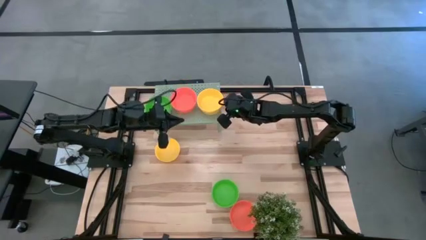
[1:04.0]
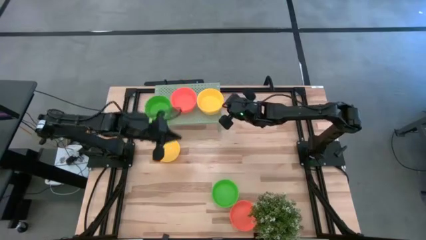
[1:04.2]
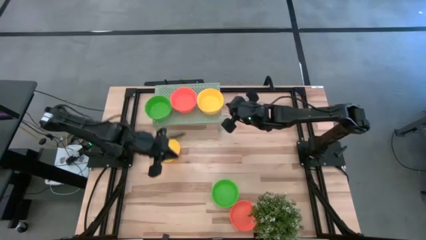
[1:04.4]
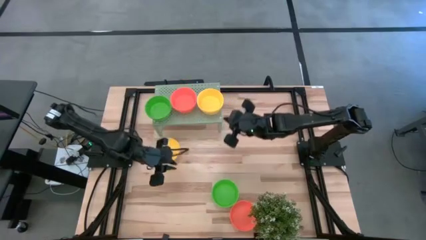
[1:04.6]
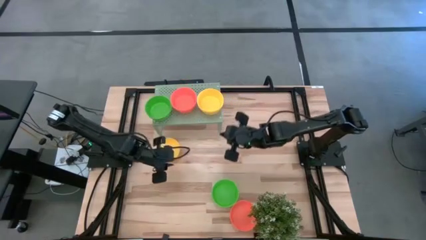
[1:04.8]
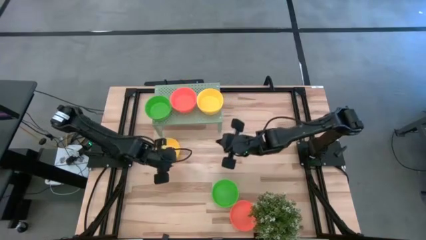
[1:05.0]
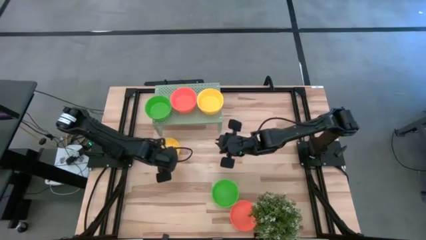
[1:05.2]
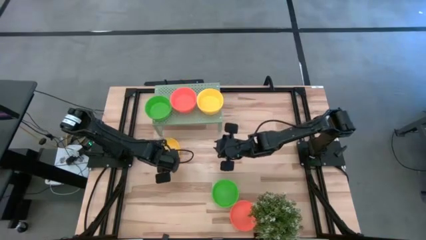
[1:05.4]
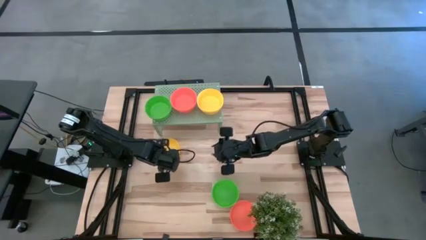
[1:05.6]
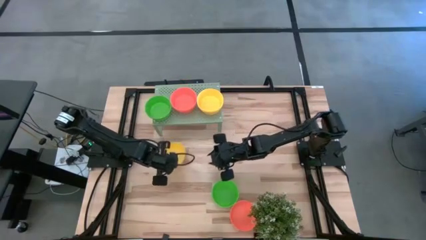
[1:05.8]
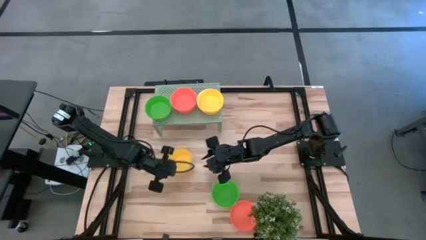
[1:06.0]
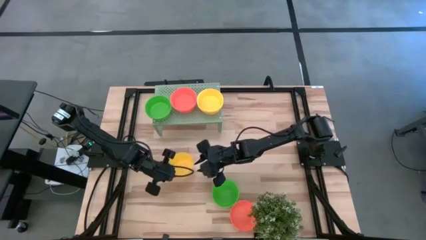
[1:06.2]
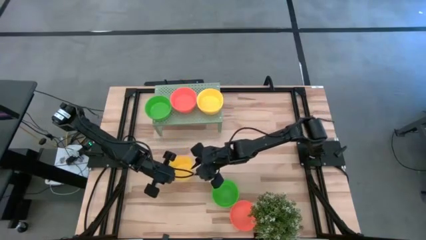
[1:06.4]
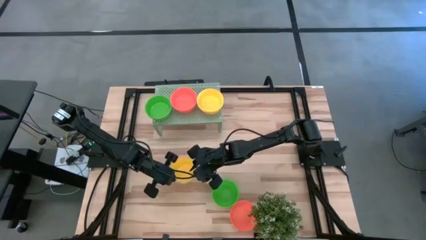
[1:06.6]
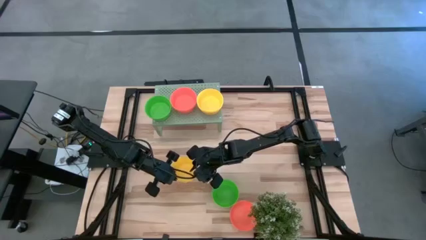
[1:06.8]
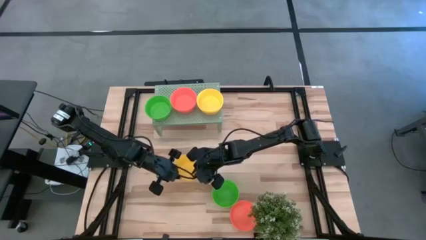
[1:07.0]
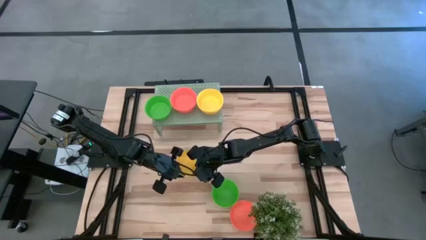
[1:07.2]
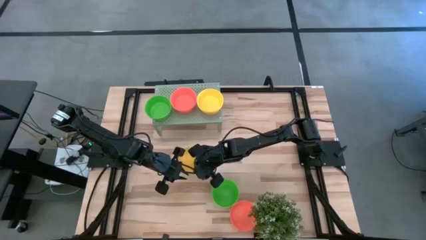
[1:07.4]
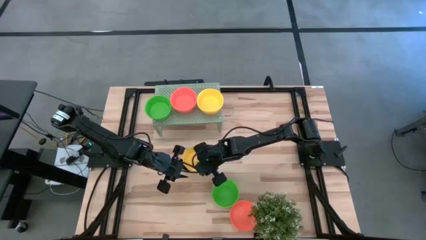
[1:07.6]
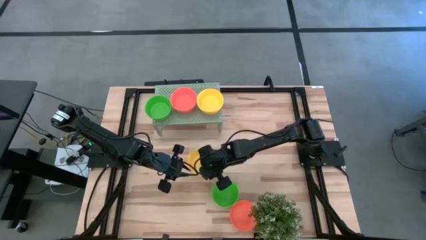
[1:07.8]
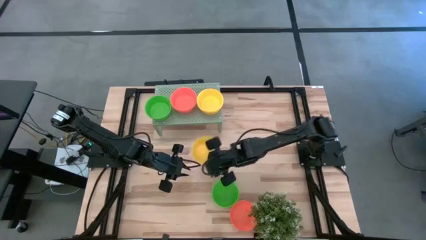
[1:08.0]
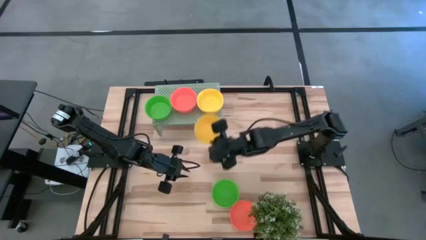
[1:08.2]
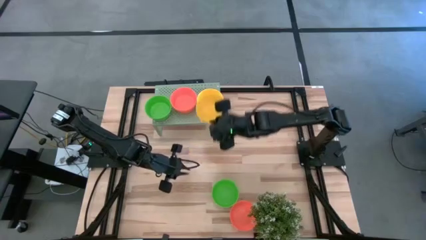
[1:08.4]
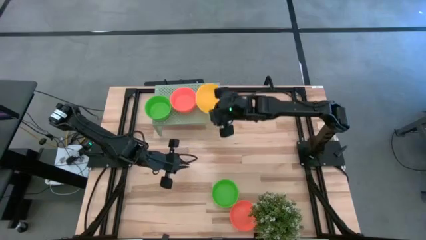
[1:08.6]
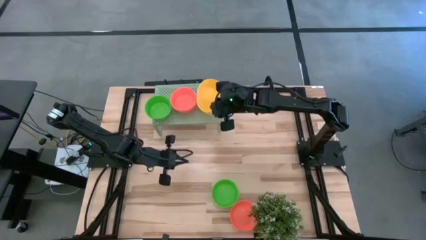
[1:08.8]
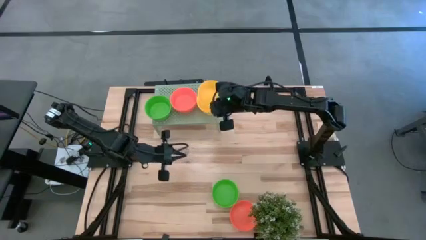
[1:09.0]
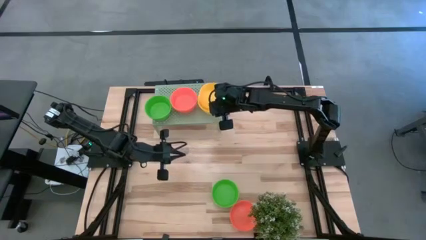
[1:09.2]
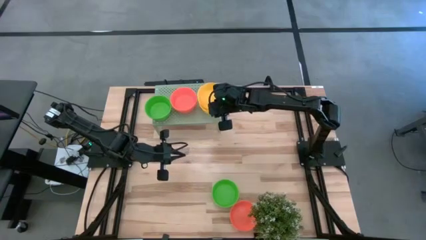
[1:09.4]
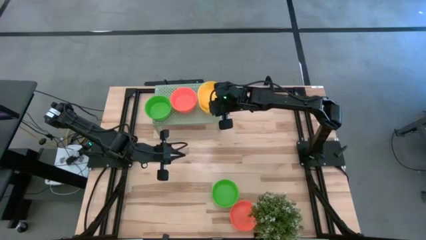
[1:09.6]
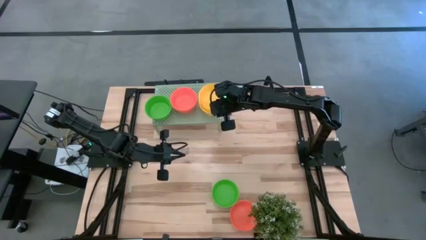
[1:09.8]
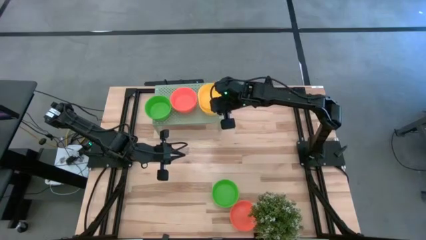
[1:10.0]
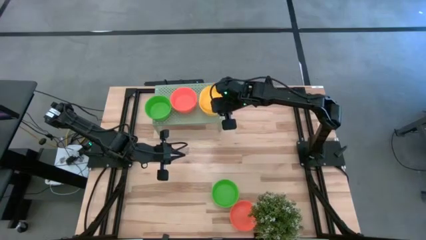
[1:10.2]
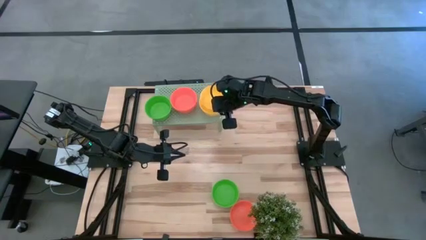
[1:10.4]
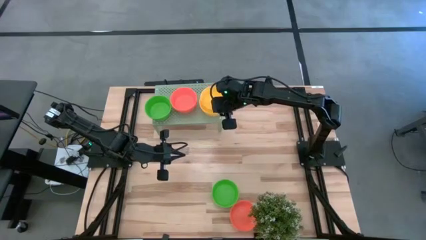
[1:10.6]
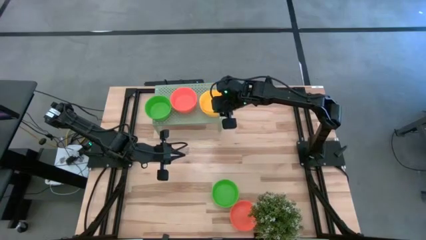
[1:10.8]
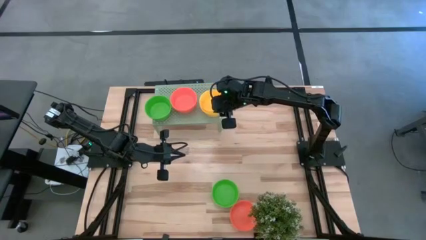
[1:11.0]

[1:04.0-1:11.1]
Task: Pick & Place Mini bowls
Stack the yellow bowl on the yellow bowl on the shelf

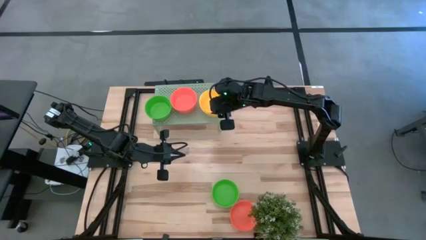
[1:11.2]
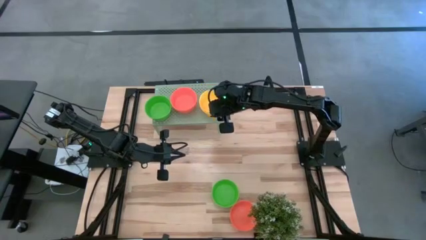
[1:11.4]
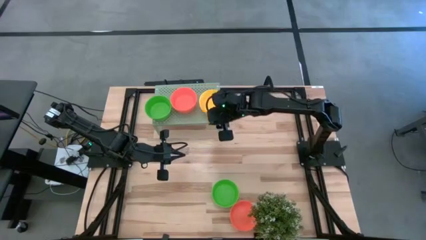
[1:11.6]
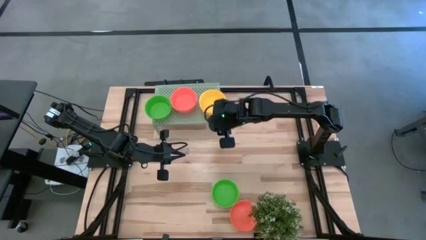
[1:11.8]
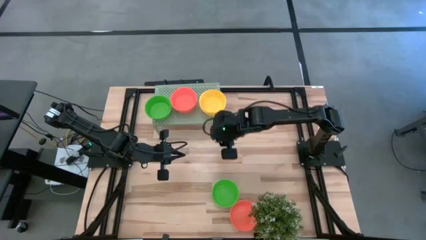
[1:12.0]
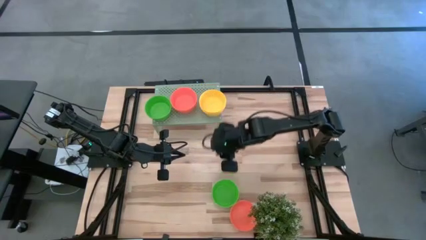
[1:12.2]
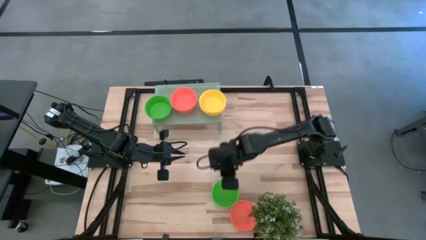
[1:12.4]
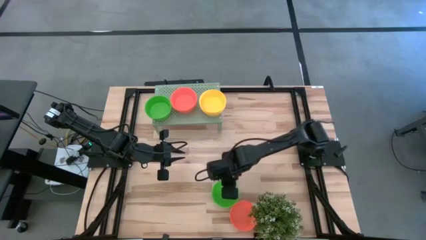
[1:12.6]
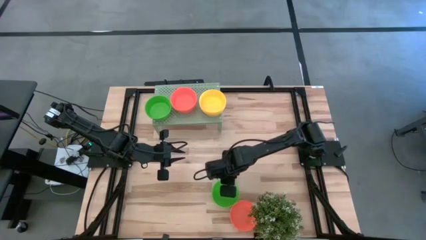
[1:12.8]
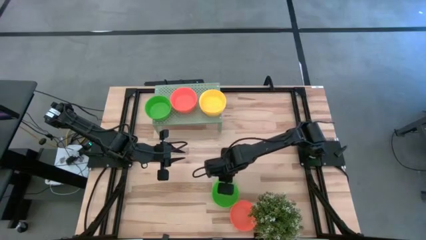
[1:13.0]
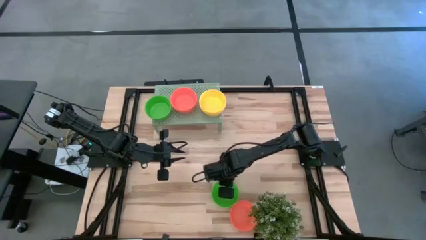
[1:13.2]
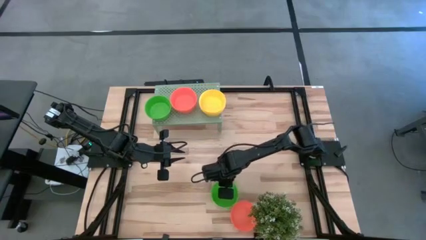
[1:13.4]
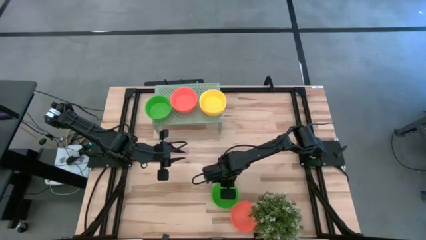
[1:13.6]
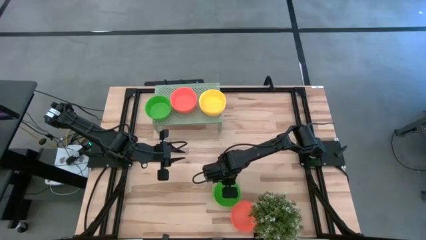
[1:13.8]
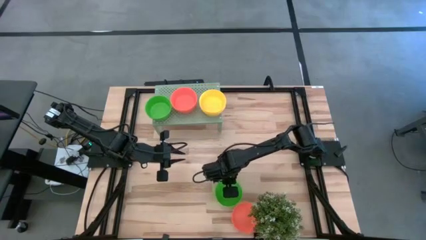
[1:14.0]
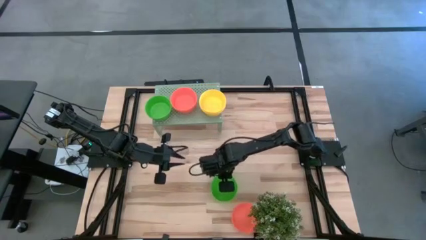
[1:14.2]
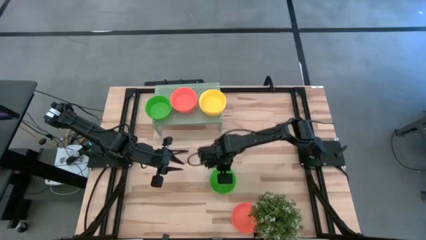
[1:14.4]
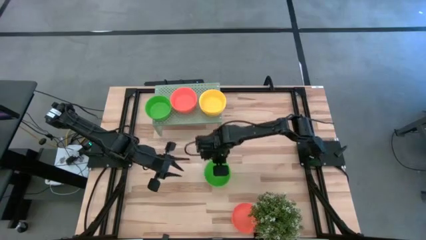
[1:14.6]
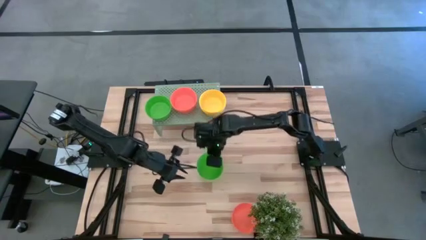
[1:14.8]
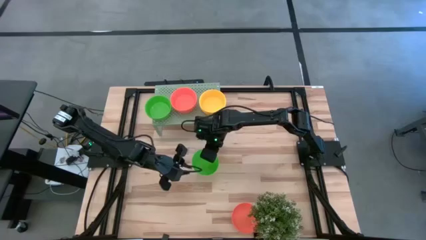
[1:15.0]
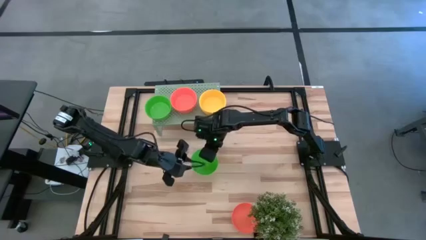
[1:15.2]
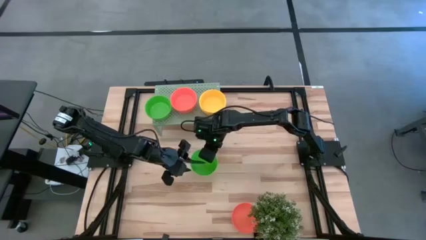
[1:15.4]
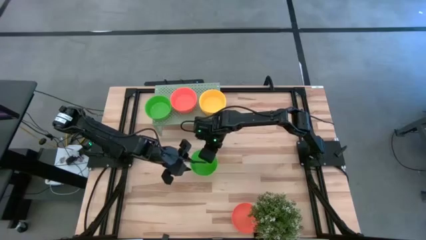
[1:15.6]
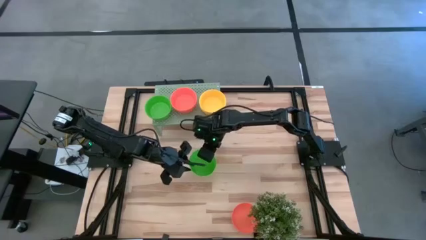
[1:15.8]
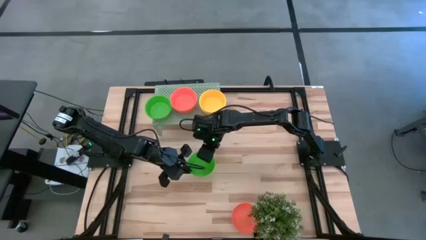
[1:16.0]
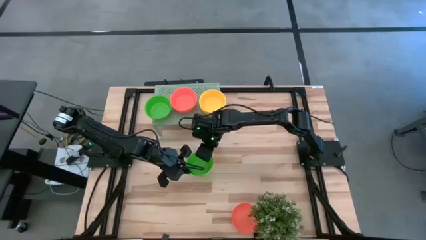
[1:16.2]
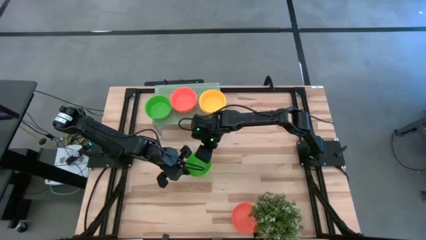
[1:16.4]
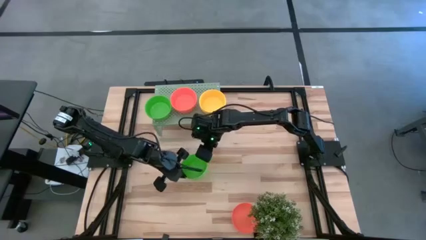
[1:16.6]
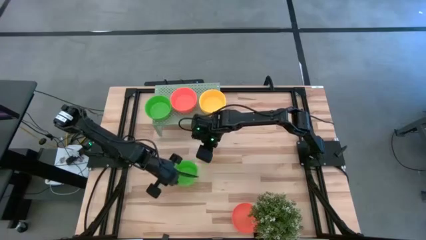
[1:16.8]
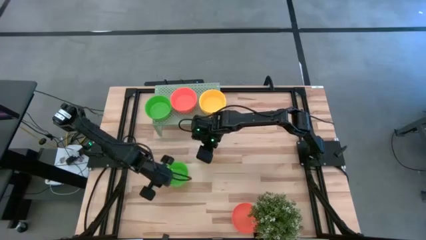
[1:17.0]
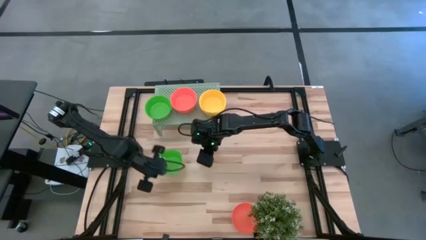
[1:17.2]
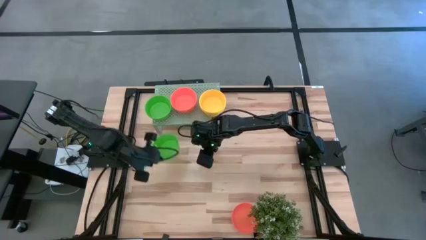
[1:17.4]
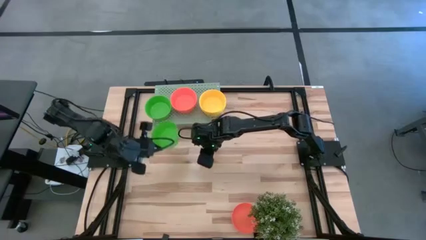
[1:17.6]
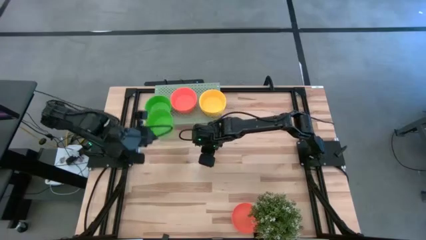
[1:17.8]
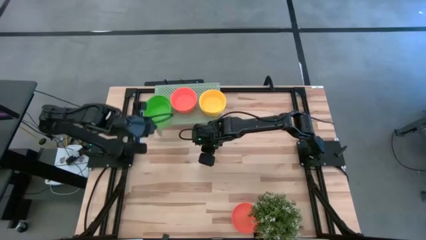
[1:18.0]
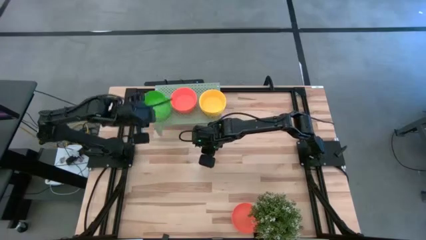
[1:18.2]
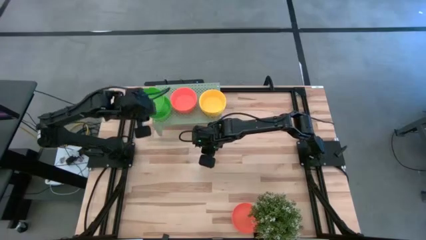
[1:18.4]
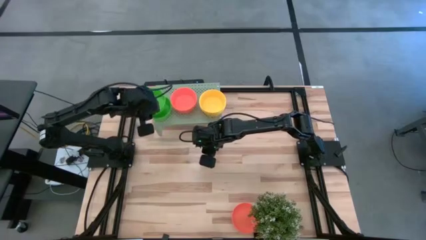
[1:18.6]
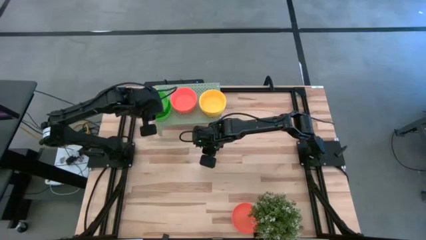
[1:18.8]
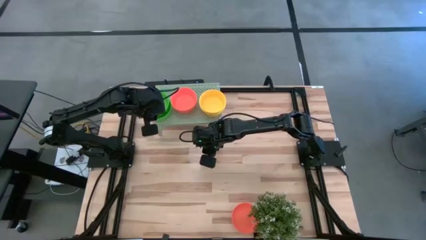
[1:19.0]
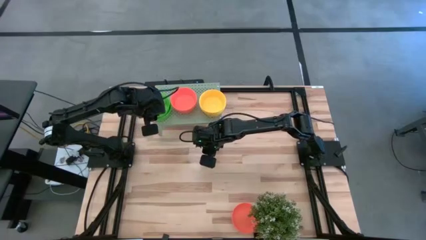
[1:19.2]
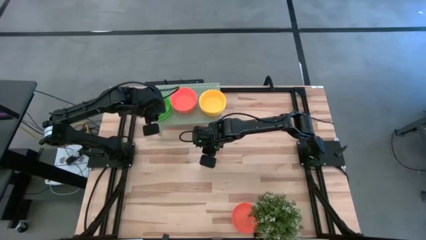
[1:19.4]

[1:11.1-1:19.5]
Stack the green bowl on the green bowl on the shelf

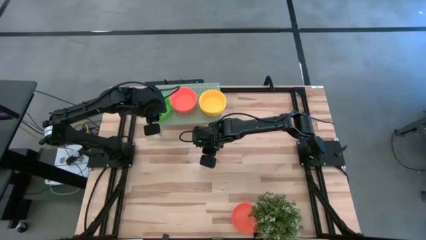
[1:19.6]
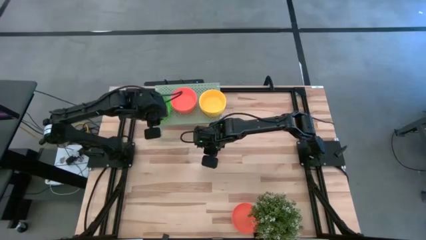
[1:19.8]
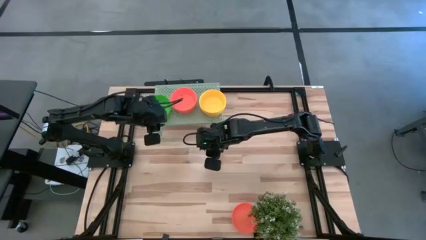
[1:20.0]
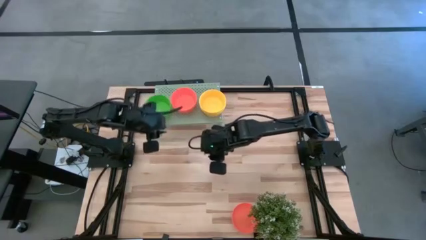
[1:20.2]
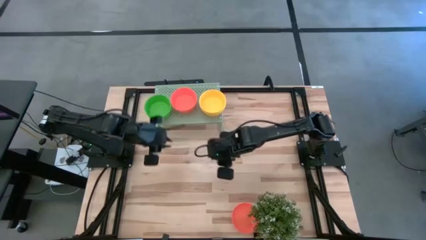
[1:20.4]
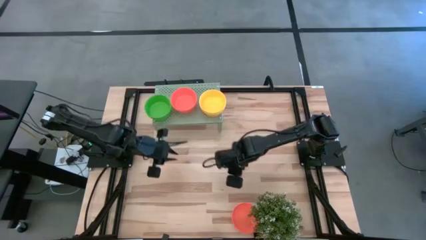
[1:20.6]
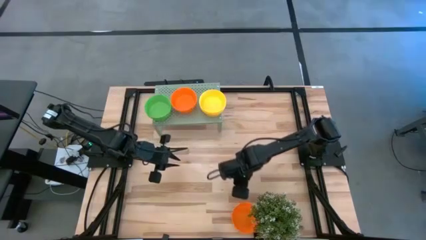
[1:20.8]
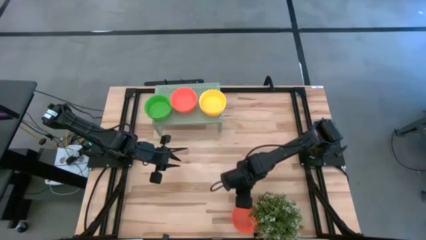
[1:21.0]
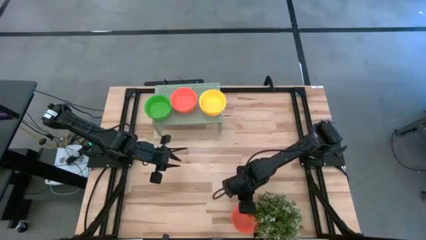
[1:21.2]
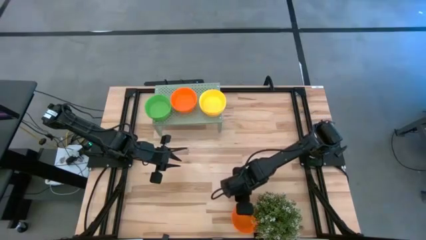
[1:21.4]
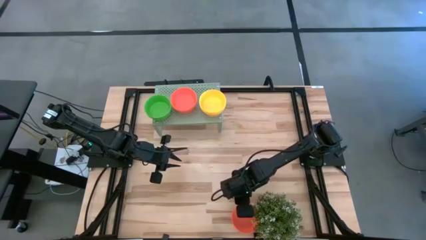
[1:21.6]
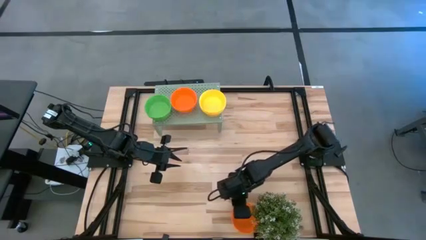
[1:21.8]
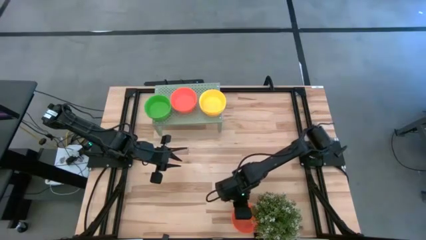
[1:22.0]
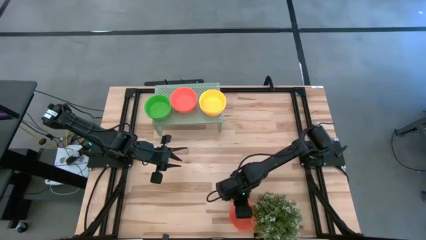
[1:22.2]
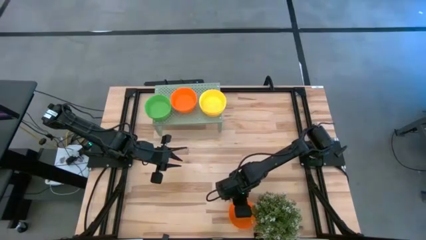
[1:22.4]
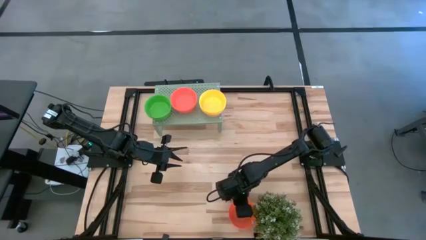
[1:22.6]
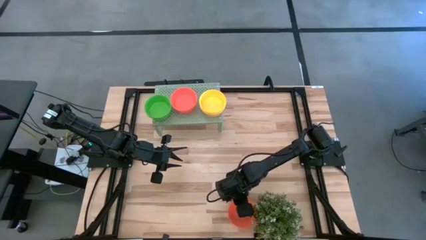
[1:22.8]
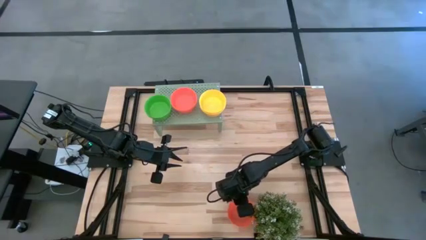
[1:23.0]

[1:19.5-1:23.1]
Stack the orange bowl on the orange bowl on the shelf
